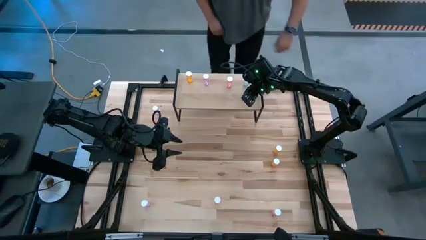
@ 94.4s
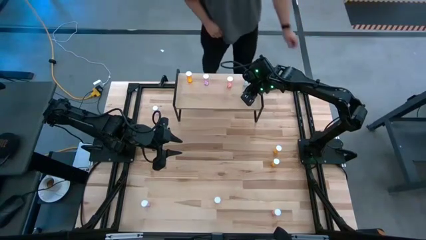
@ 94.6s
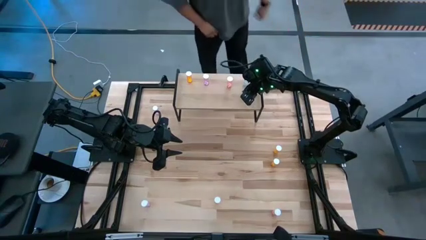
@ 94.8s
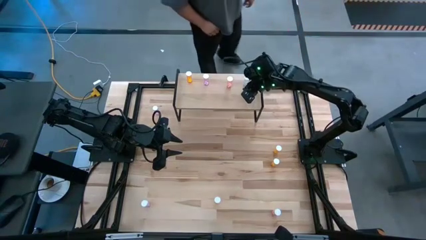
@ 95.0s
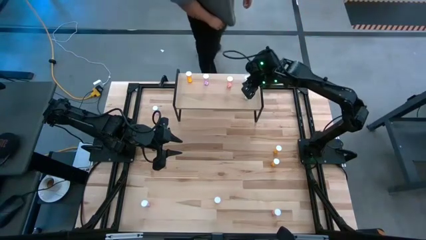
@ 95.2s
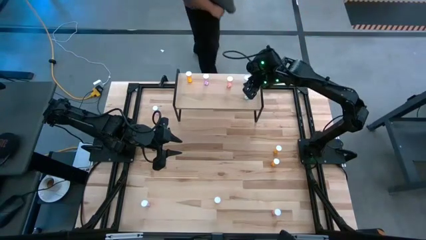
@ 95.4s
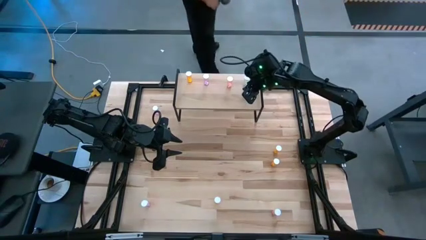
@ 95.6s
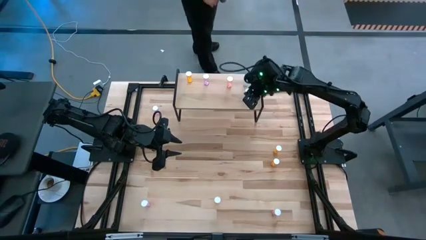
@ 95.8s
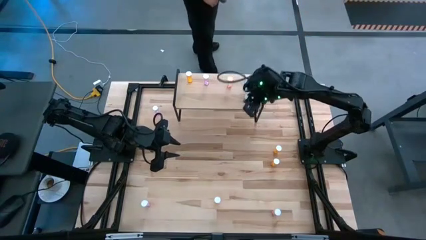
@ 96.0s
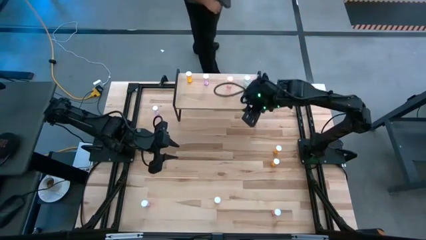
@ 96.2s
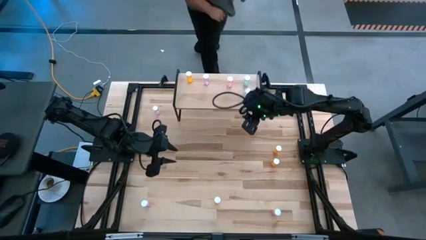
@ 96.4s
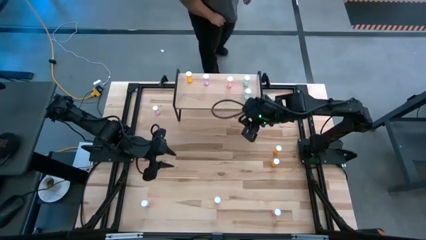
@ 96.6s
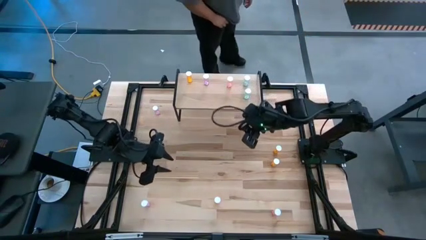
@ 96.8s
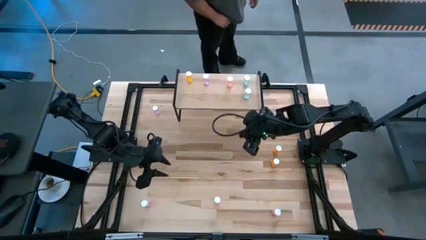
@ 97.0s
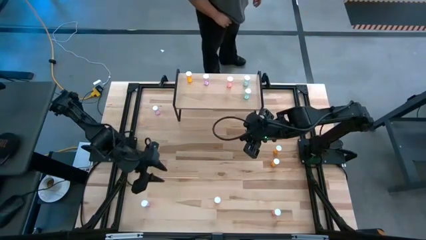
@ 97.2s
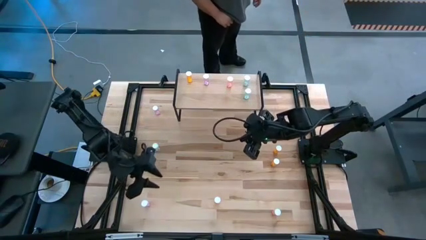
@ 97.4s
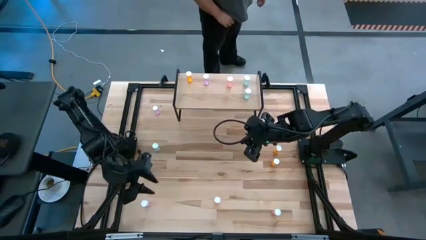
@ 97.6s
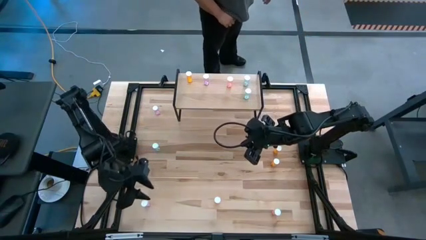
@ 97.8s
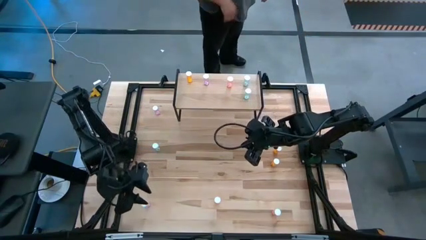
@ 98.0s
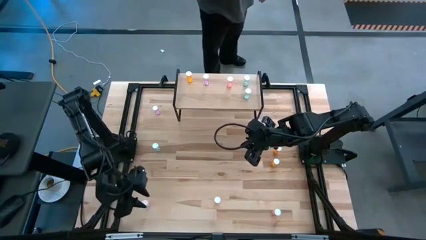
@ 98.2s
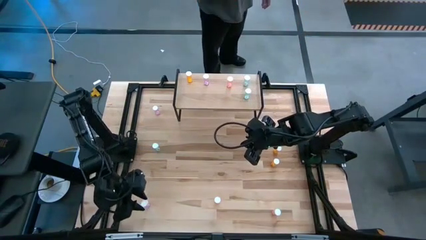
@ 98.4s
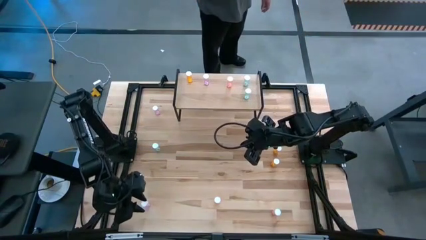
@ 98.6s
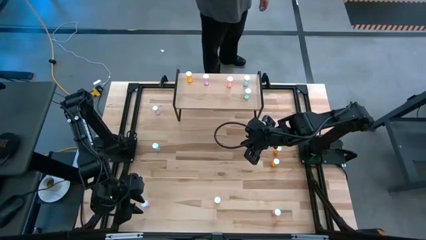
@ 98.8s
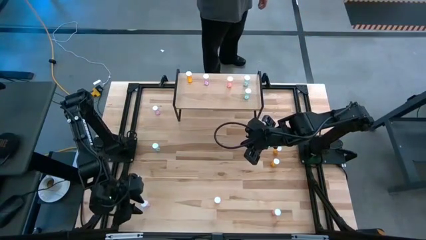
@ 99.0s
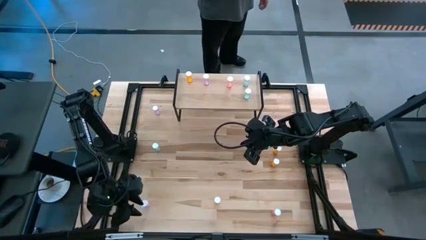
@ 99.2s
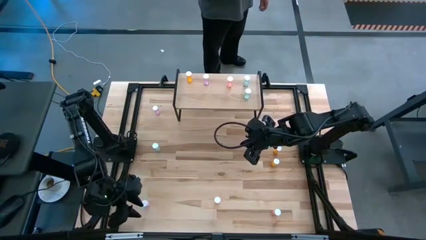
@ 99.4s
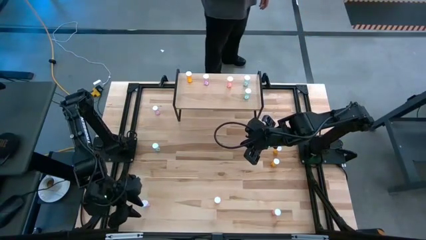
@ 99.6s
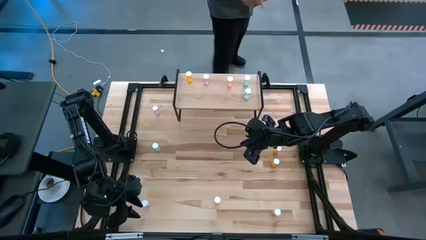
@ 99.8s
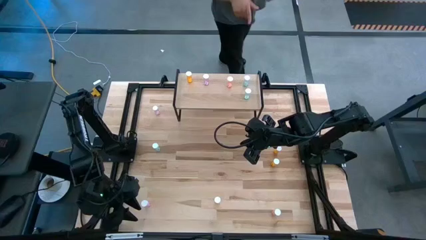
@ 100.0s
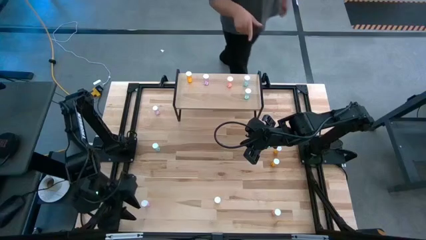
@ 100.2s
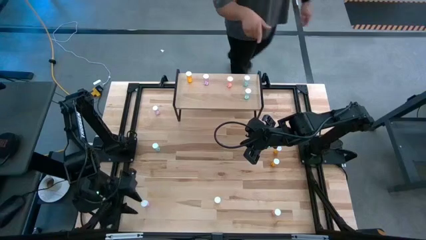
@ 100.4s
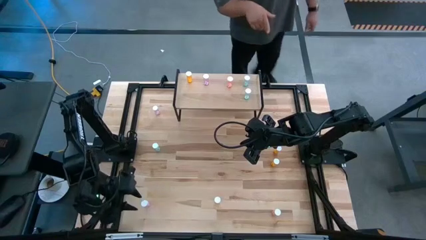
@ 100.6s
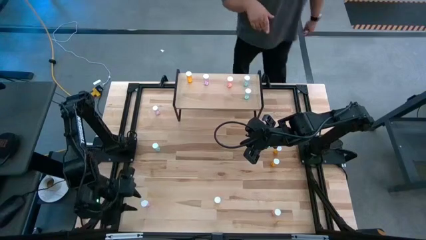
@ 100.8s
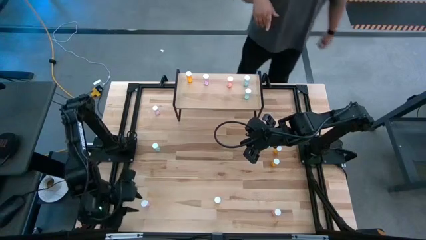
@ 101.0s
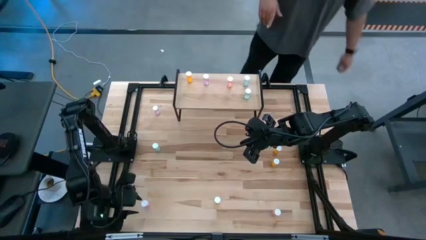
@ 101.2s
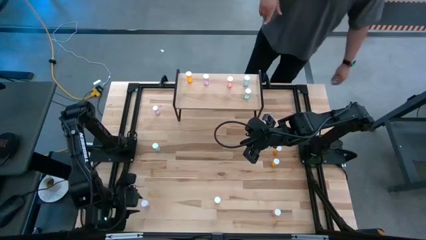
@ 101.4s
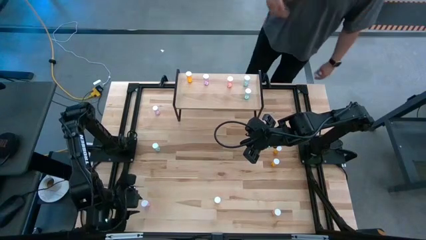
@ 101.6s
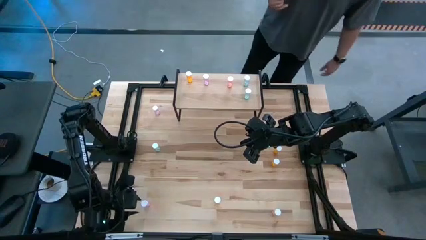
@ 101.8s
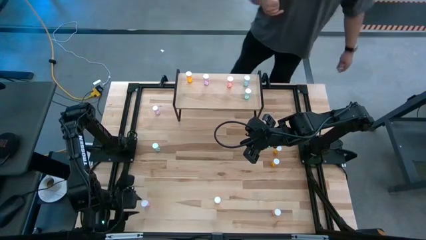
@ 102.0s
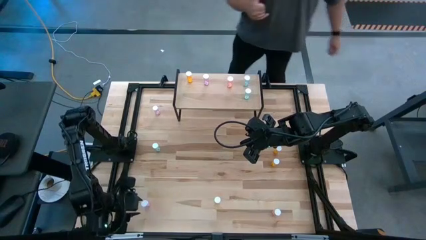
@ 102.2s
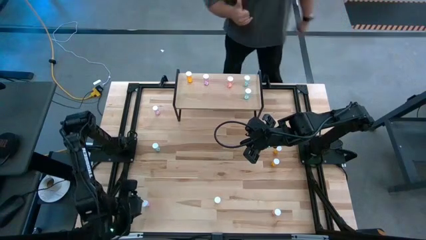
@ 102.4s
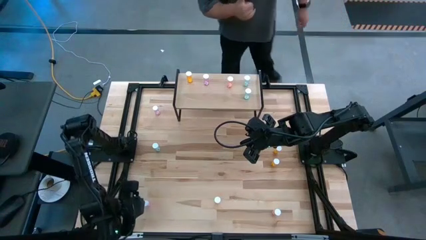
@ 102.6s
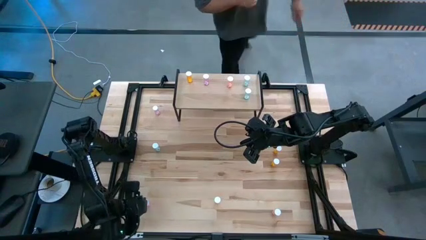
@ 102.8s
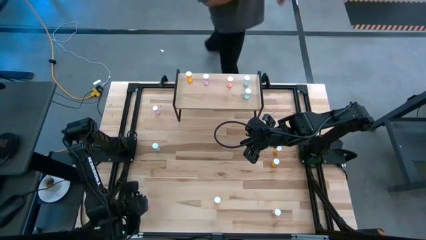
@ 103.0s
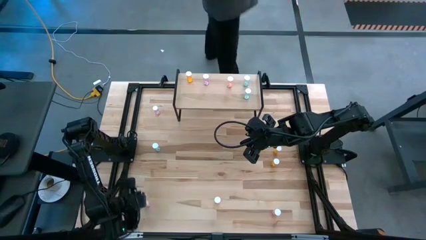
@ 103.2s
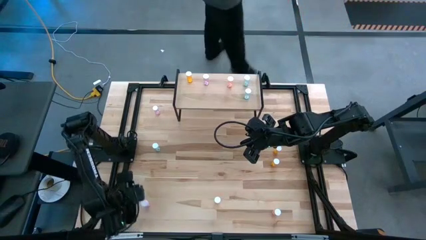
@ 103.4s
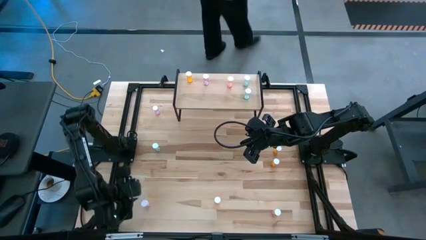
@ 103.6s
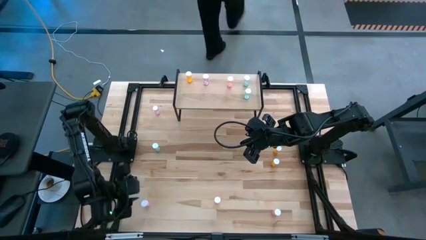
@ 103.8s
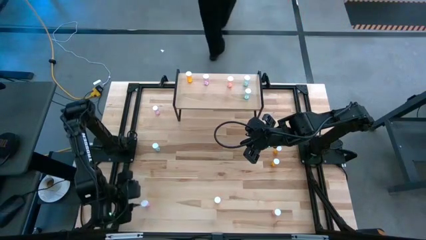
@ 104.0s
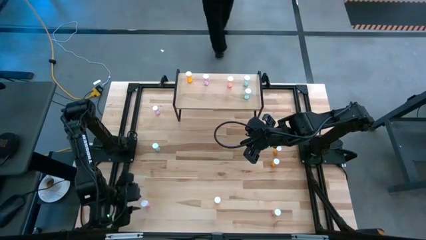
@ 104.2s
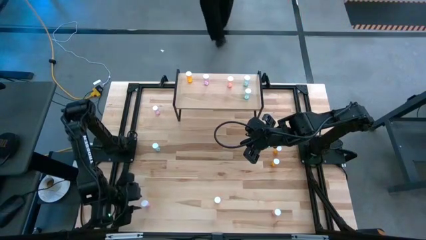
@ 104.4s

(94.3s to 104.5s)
Task: Pick and place medicine bottles onto shelf by color
Put the bottom purple pill bottle on the shelf aligned with the other purple pill bottle
